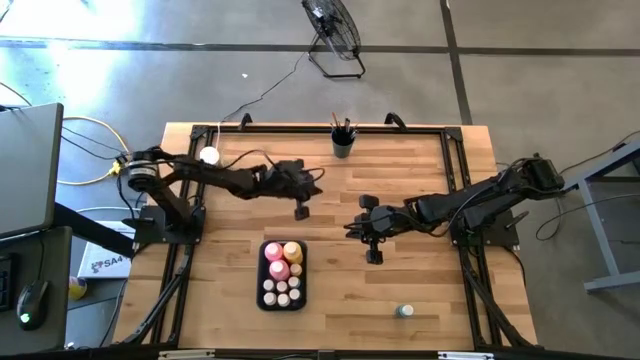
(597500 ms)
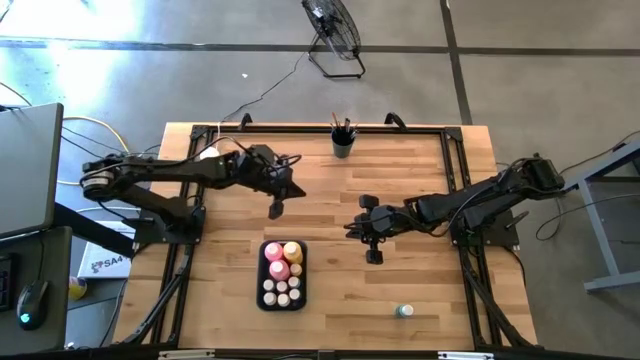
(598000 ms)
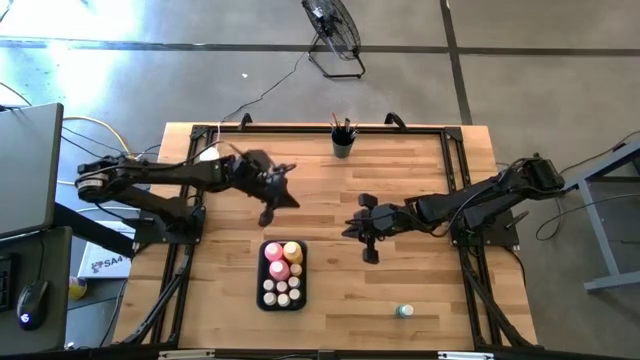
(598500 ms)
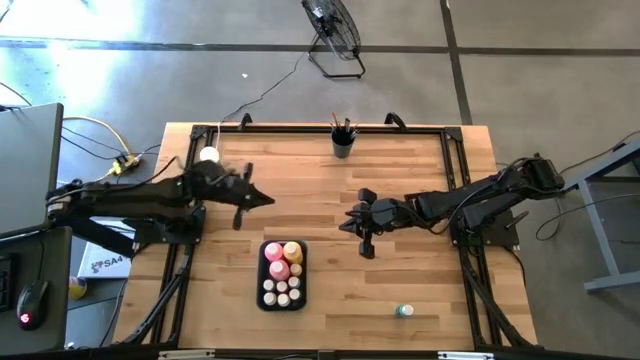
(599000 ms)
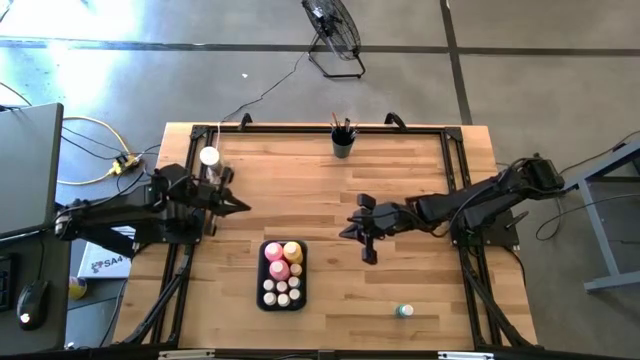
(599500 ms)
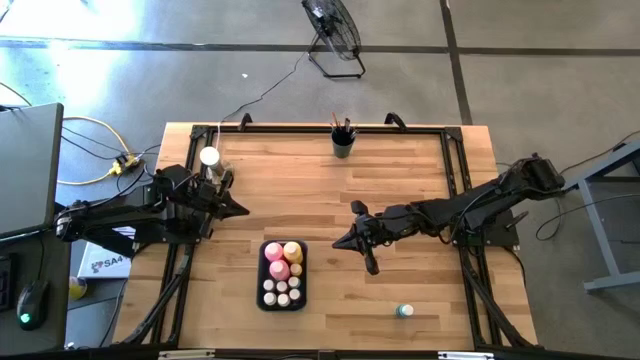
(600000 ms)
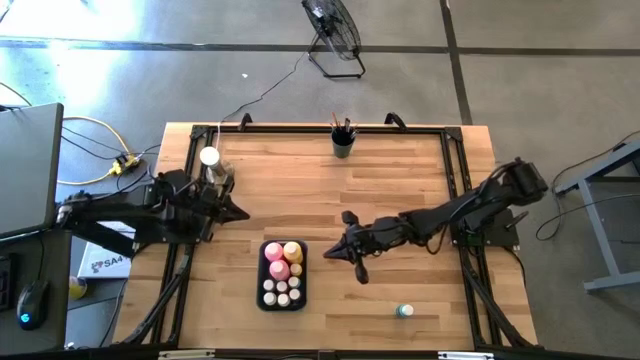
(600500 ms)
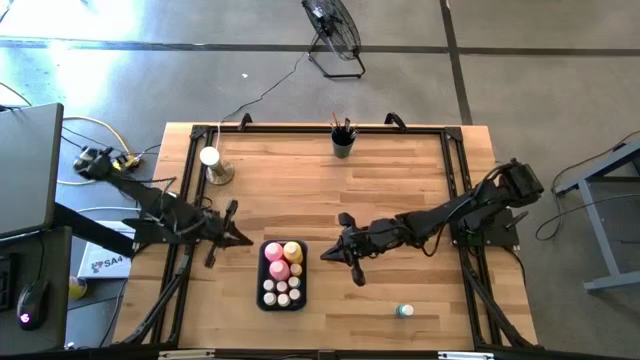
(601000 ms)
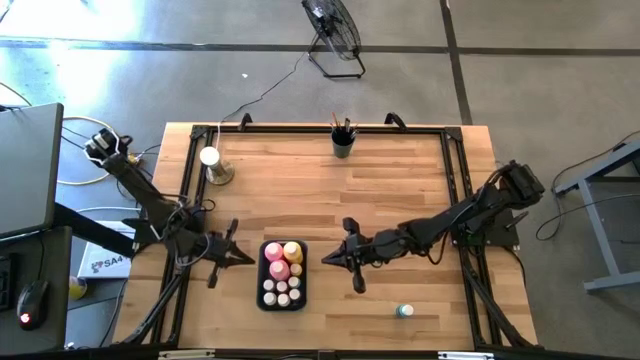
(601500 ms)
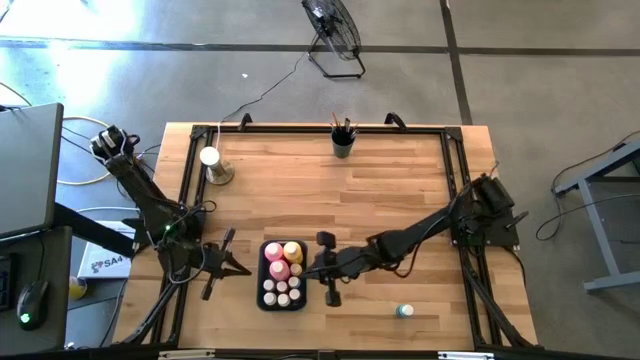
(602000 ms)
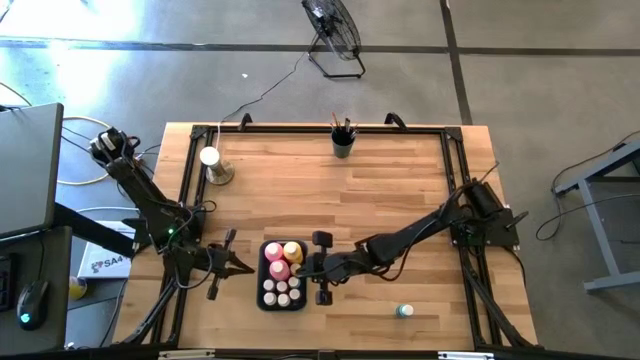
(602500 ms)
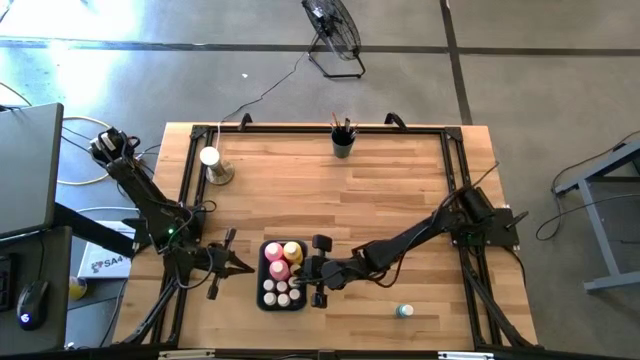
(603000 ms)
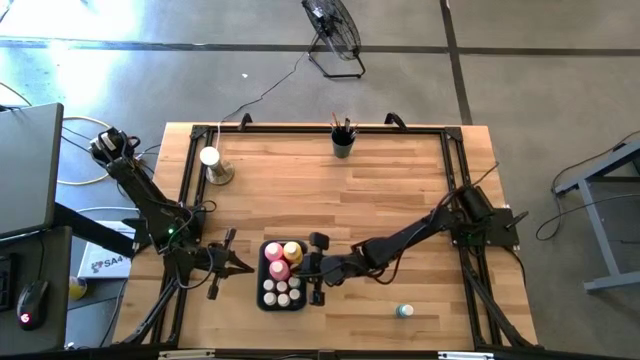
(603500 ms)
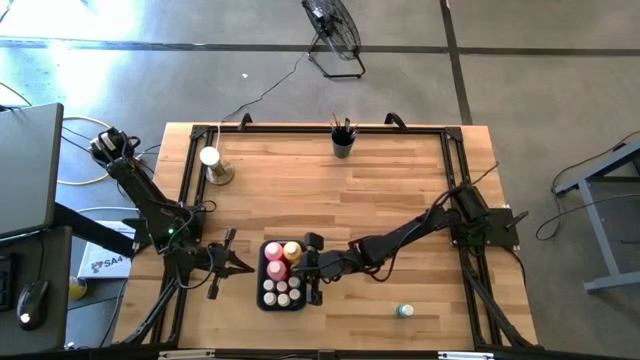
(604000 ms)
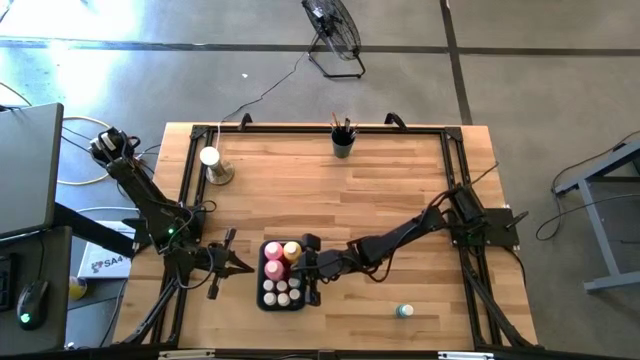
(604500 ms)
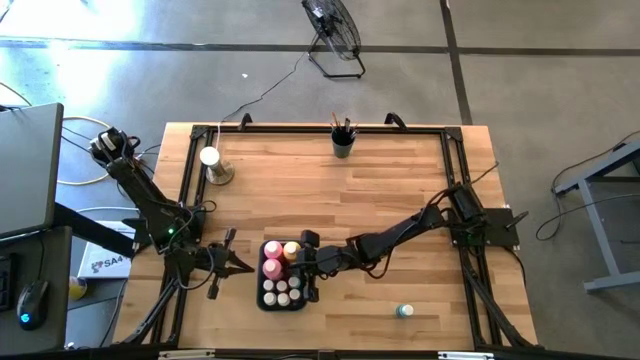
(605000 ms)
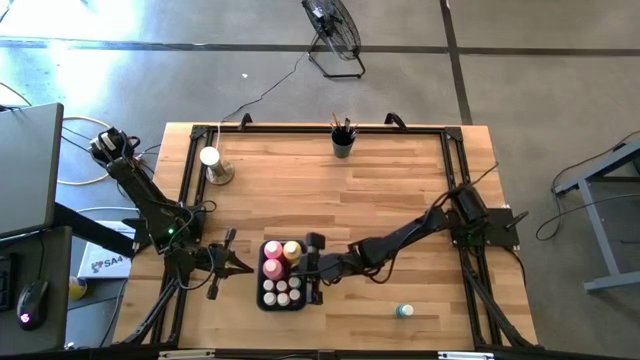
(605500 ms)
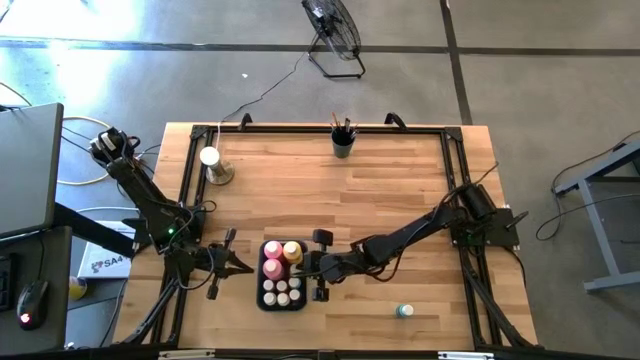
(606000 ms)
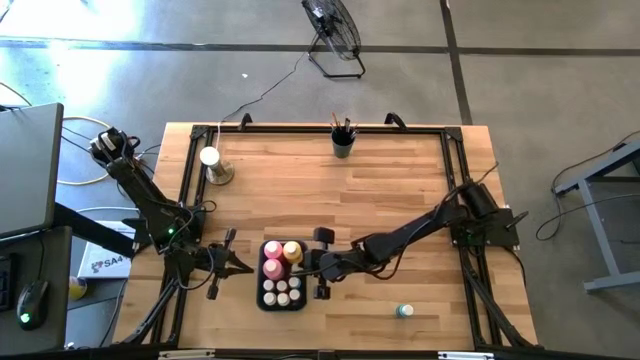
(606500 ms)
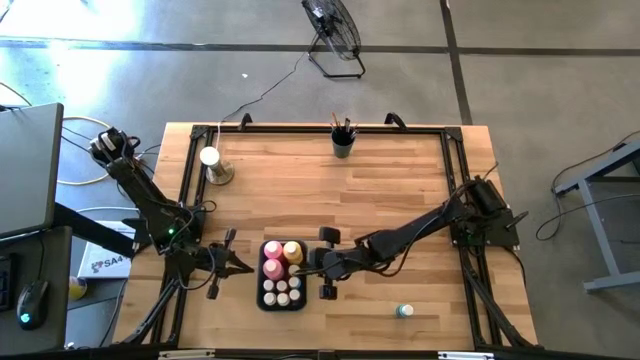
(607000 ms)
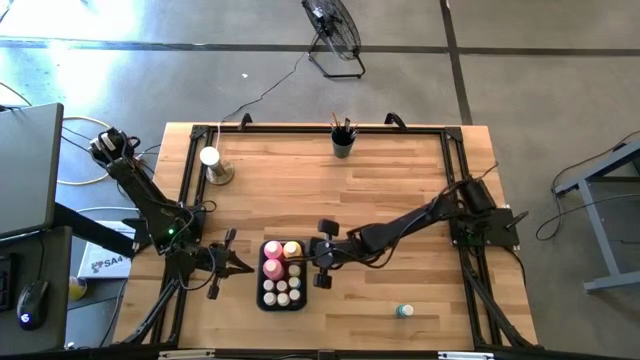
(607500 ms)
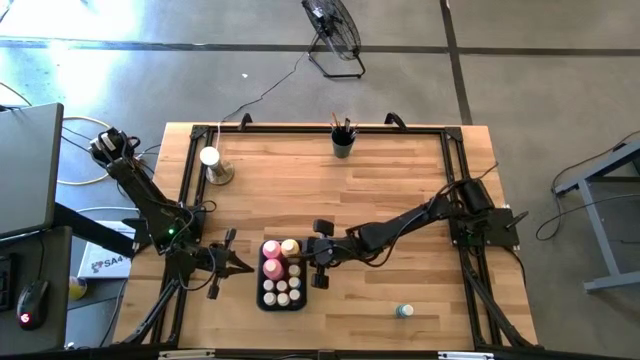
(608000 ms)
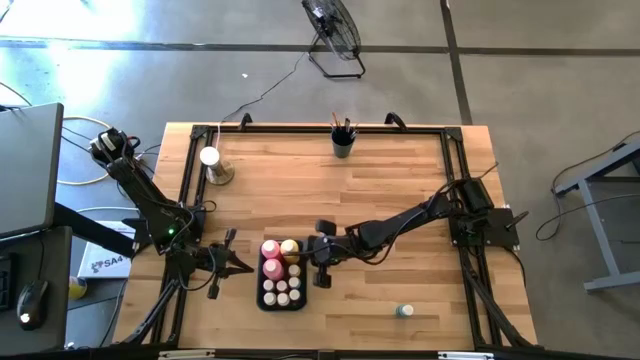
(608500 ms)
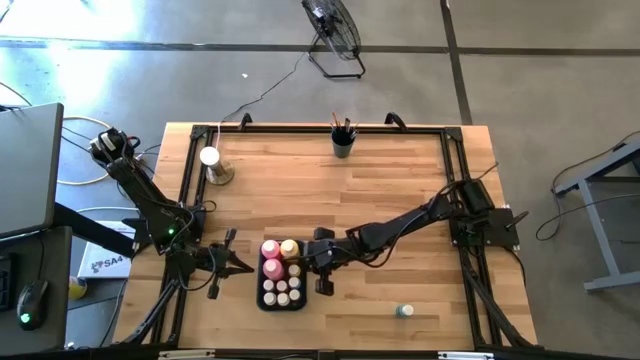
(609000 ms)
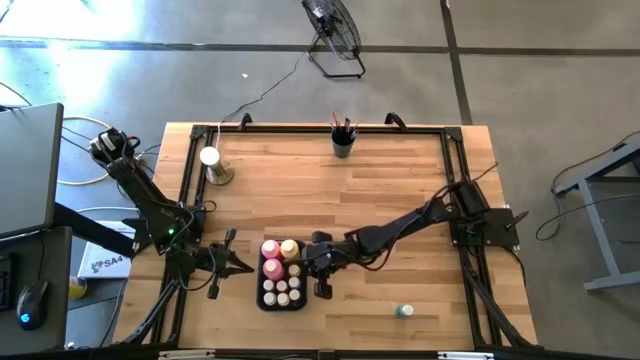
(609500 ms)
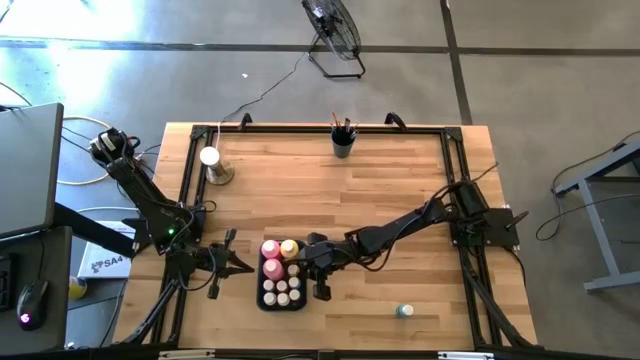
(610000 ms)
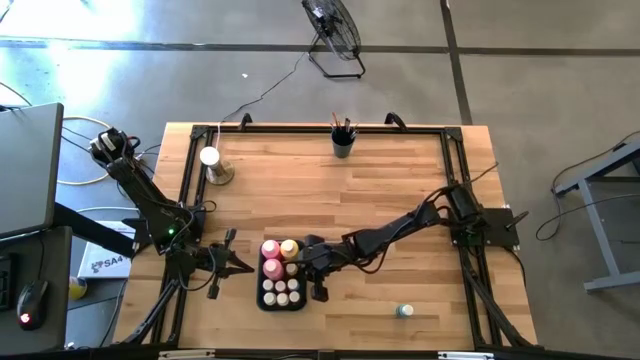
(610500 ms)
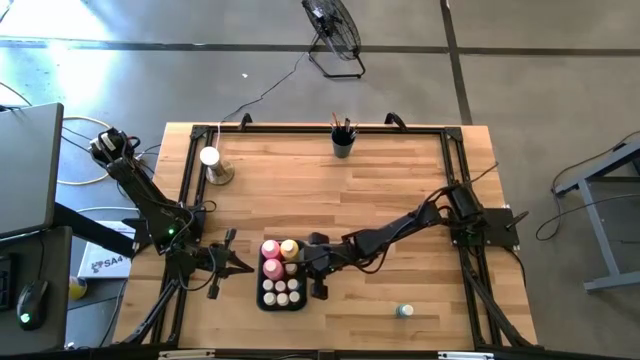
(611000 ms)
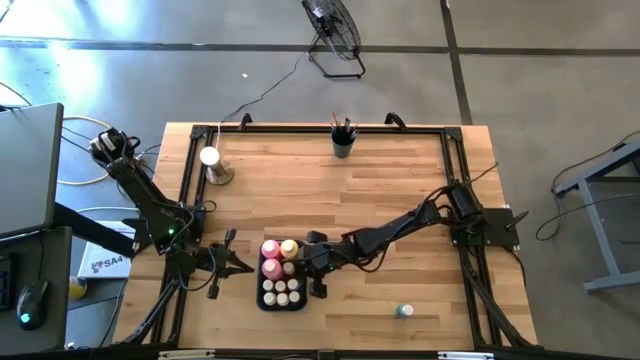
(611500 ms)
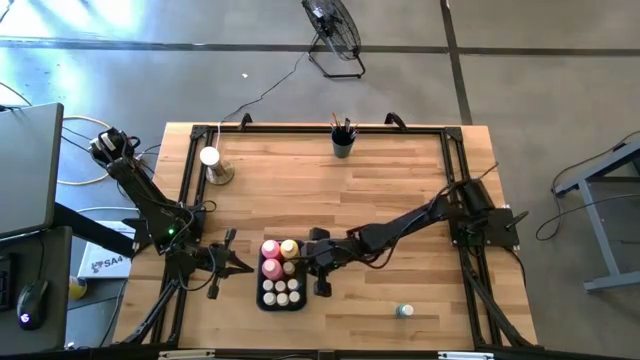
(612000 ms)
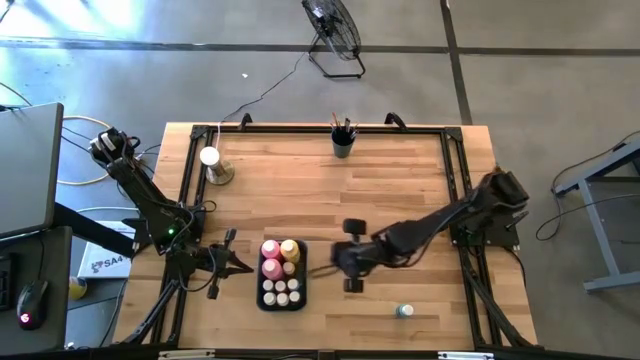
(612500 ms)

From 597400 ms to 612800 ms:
Task: Pick & Place Paint Supplies
Adjust the paint bottles on the green bin
